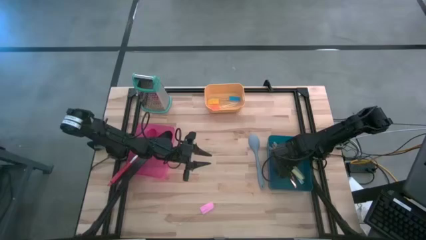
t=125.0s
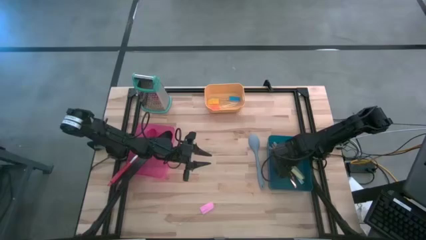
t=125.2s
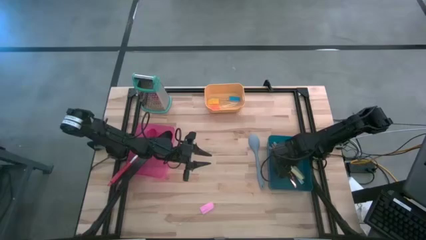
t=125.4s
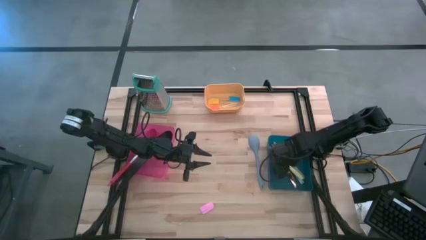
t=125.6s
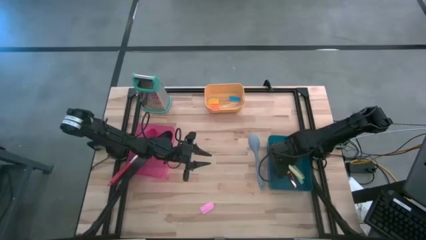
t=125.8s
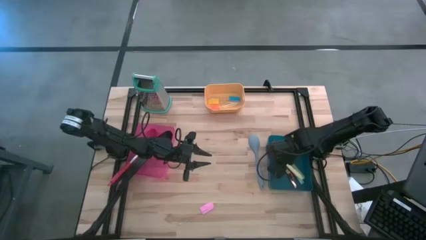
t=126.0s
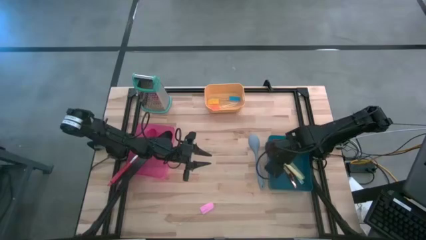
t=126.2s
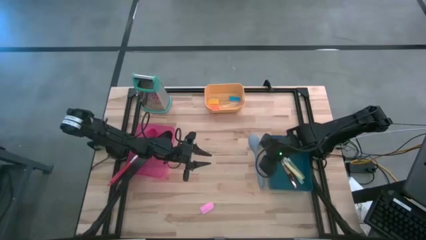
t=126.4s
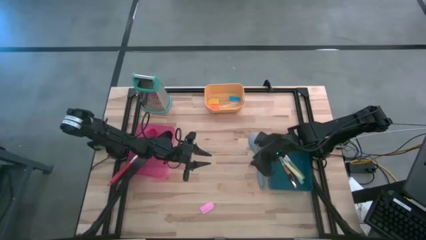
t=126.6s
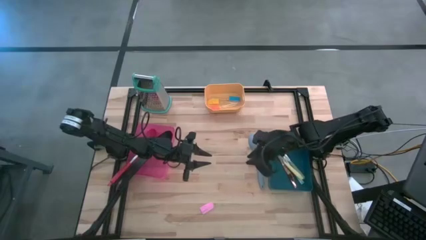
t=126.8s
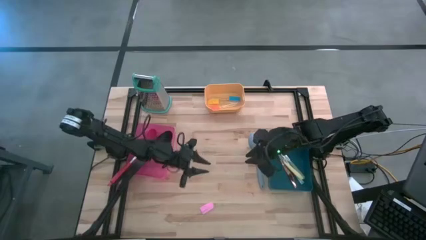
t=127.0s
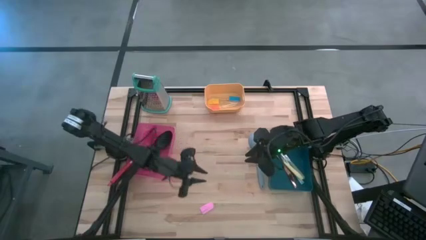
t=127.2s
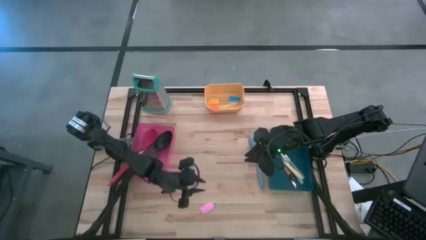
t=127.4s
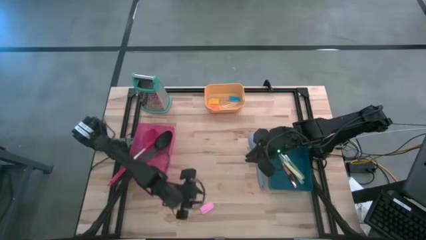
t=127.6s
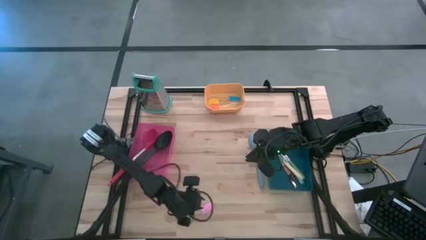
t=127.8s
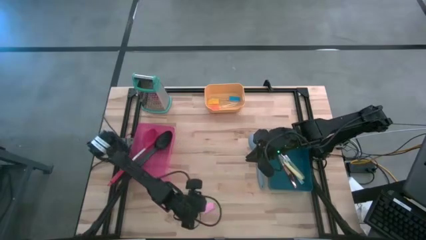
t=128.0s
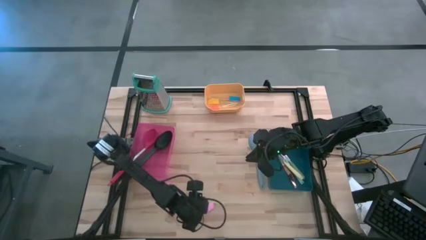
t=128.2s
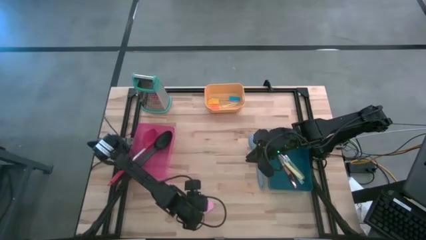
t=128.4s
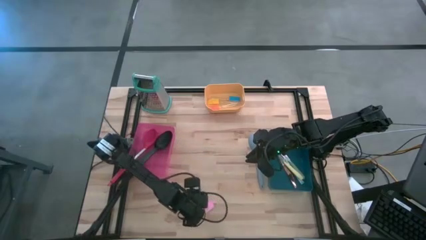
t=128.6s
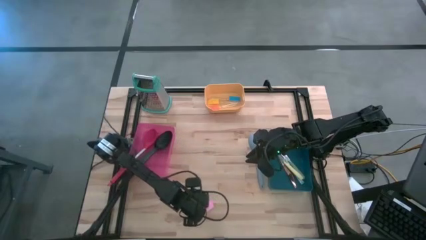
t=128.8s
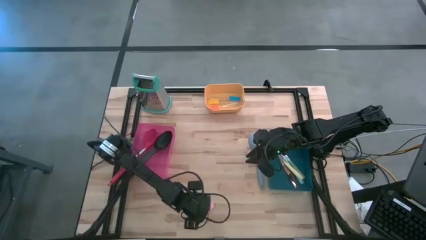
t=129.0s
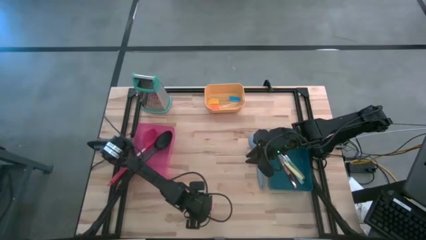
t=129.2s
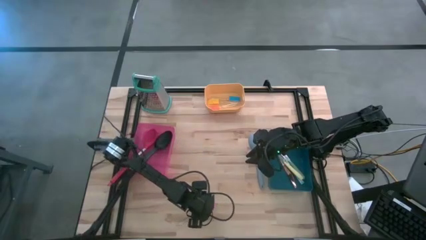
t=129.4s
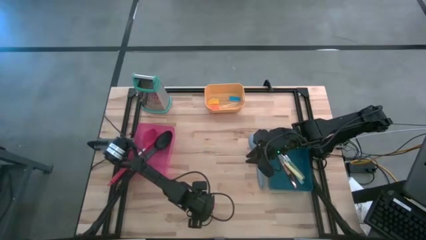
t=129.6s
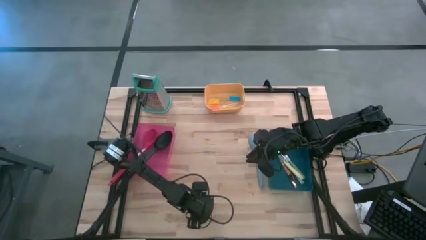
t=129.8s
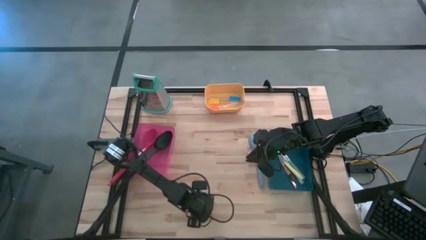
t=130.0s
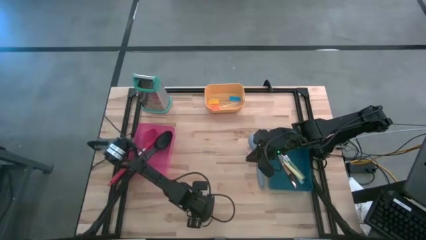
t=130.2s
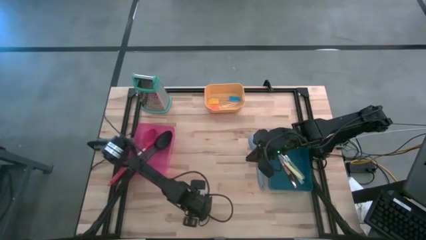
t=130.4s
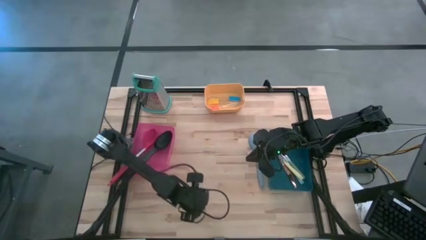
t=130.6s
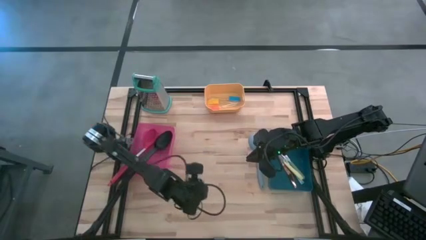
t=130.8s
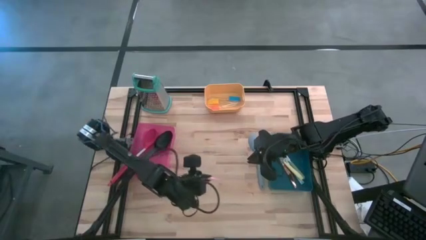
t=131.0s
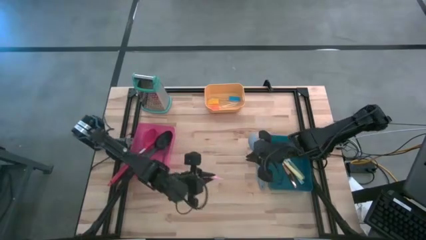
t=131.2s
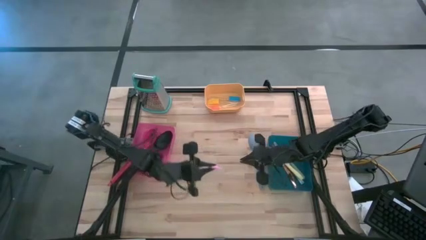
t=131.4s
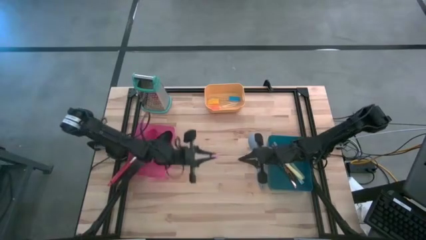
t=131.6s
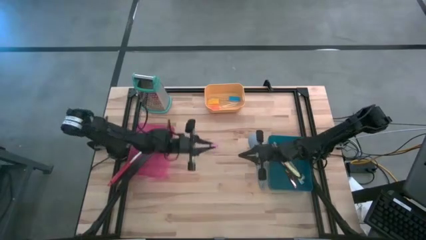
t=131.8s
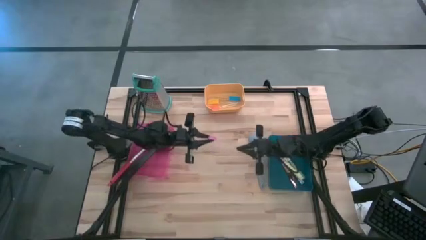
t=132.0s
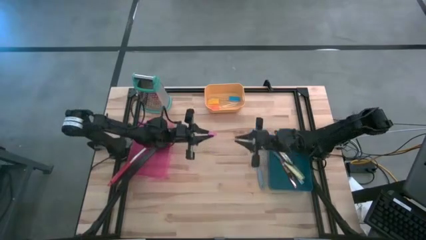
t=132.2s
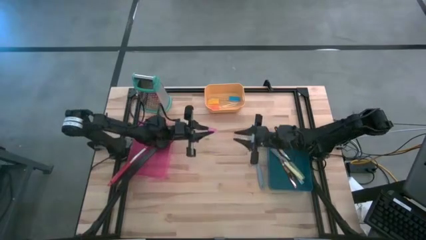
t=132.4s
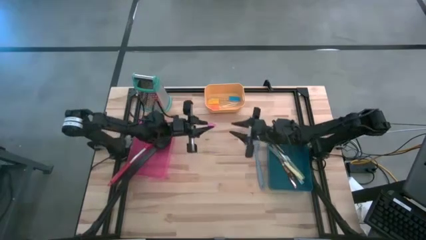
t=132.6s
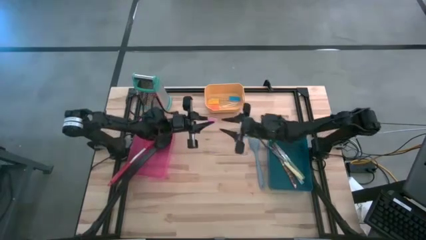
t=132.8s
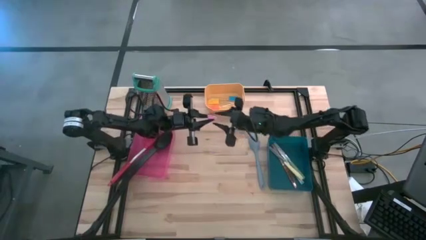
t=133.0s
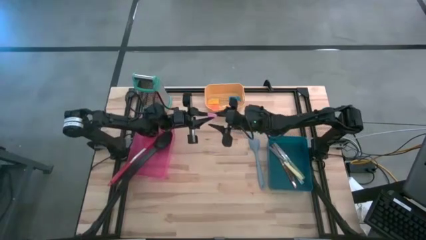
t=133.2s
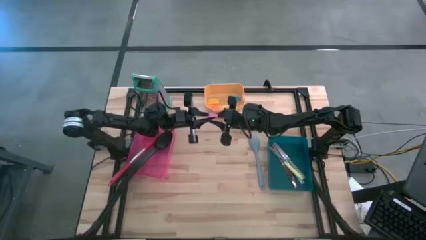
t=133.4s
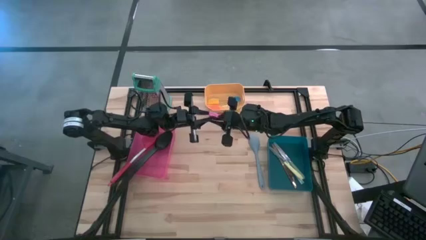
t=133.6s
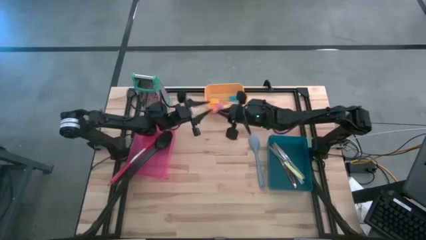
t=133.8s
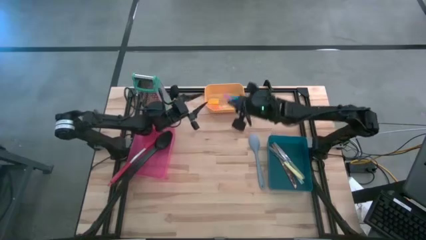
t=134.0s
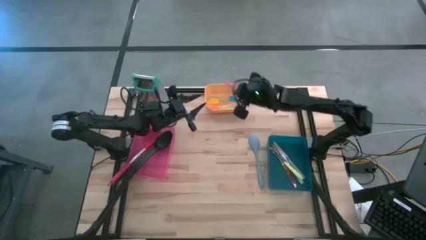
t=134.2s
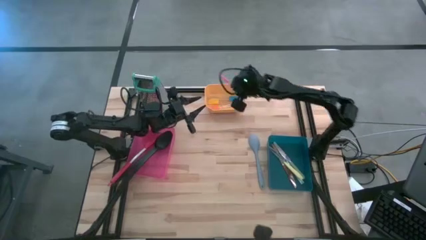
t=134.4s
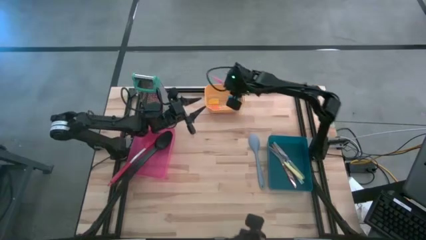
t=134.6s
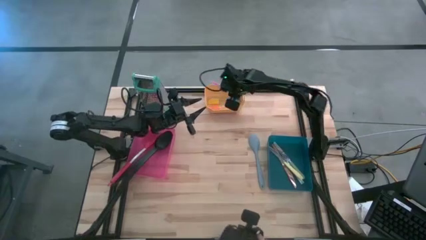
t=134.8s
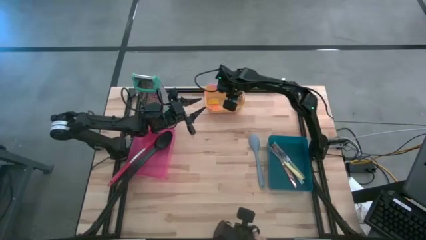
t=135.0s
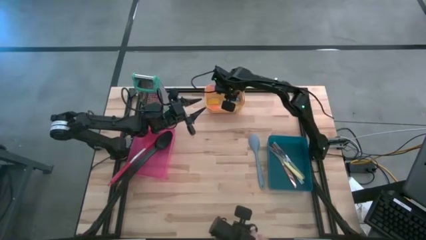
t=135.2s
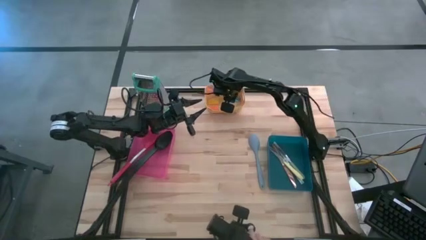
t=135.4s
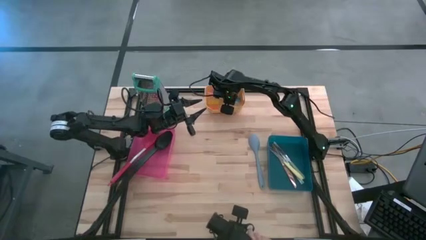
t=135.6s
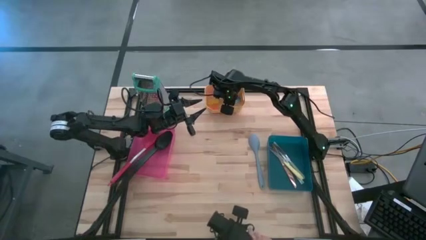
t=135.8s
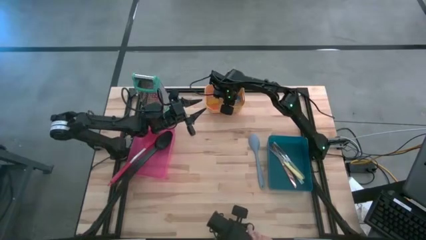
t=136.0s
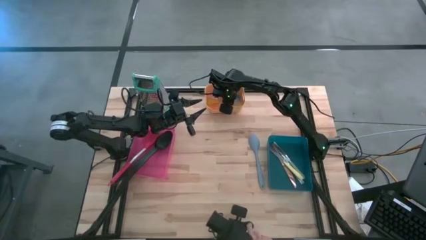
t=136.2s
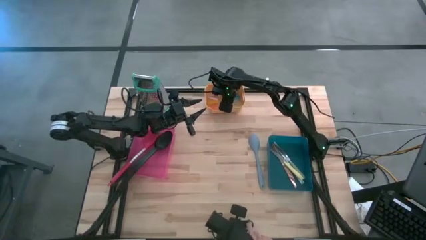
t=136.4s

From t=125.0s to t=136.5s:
Task: Pick & Place Kitchen Items
Put the pink spatula into the yellow bin

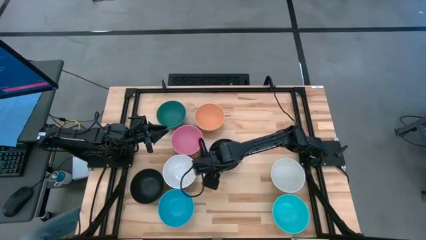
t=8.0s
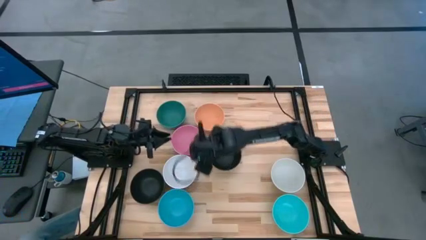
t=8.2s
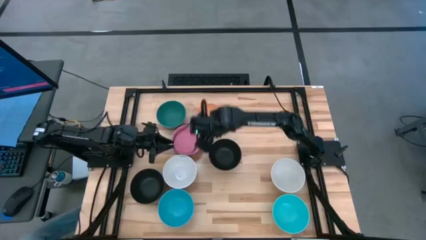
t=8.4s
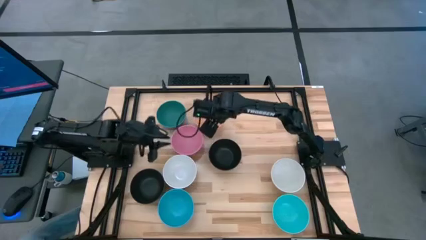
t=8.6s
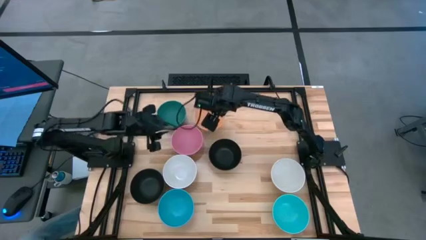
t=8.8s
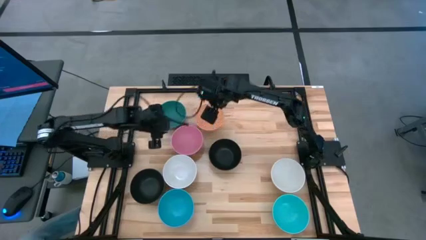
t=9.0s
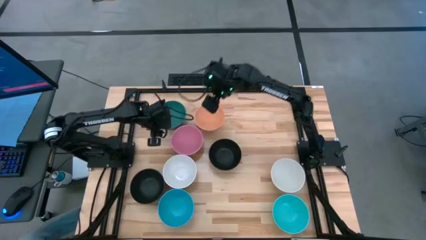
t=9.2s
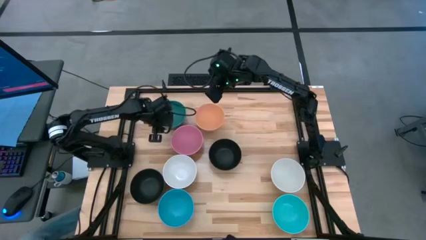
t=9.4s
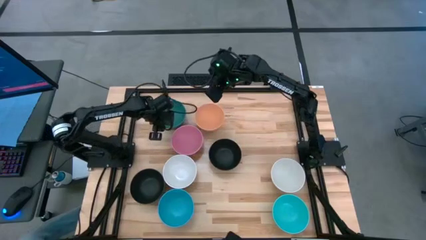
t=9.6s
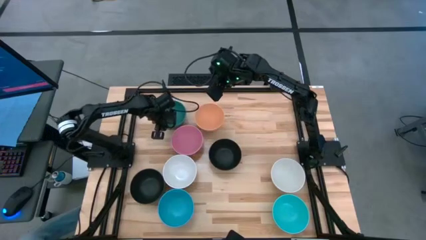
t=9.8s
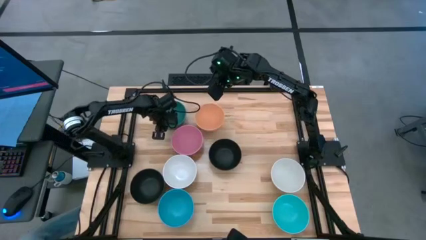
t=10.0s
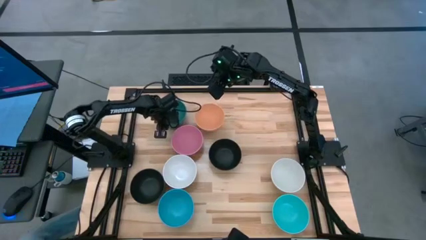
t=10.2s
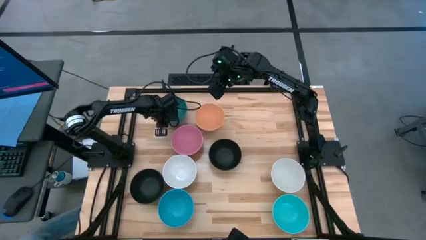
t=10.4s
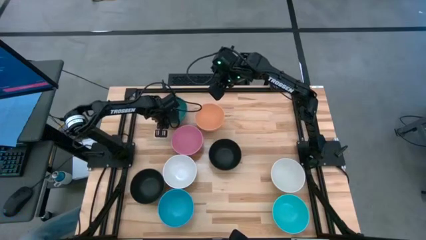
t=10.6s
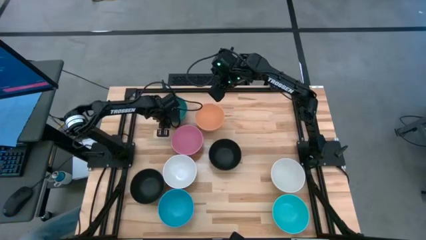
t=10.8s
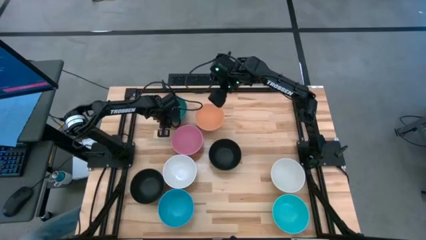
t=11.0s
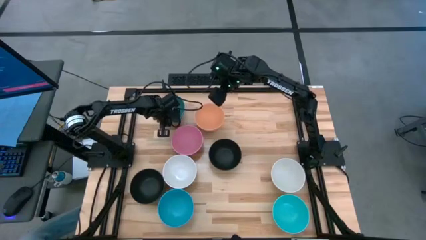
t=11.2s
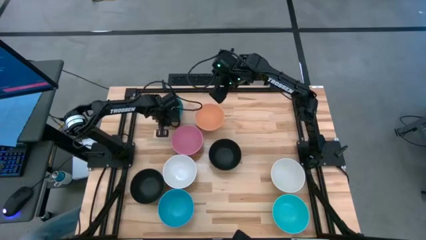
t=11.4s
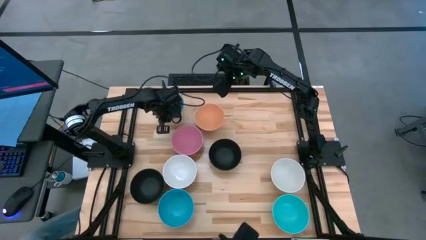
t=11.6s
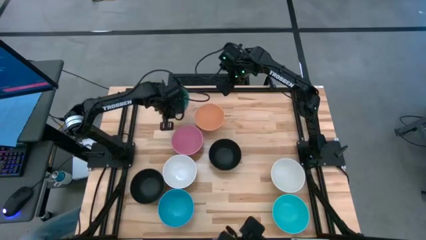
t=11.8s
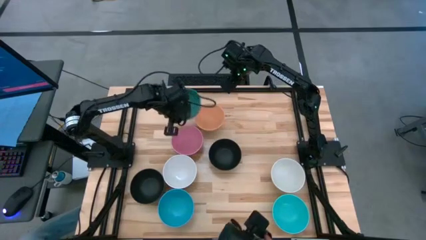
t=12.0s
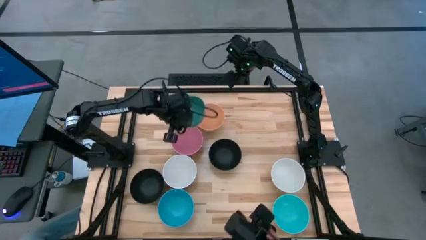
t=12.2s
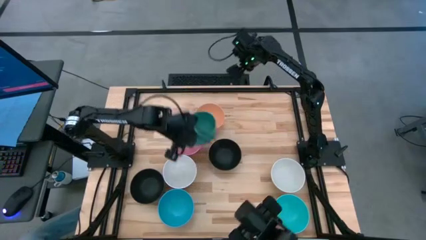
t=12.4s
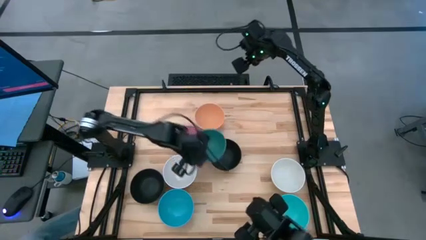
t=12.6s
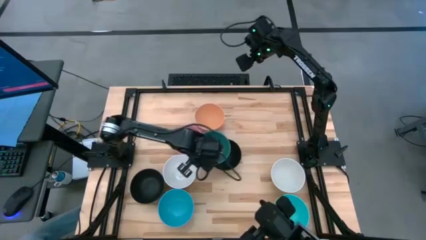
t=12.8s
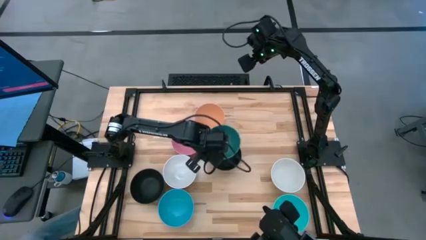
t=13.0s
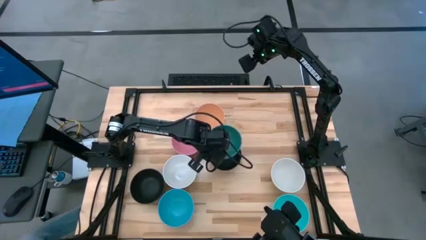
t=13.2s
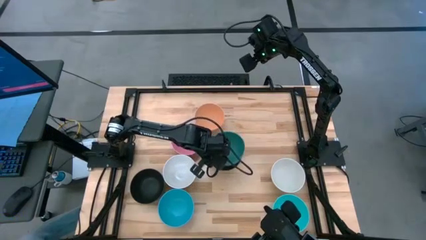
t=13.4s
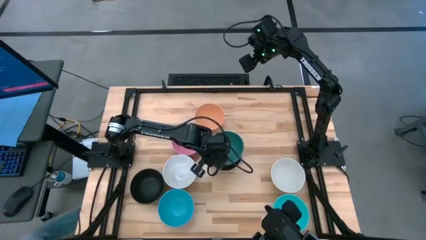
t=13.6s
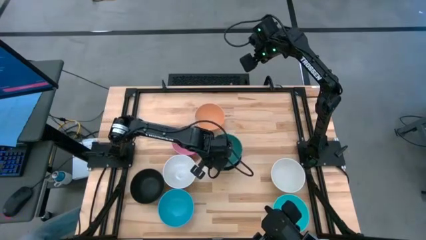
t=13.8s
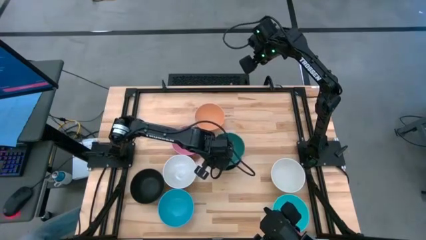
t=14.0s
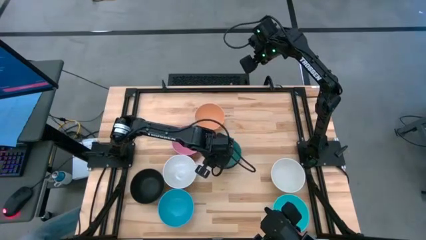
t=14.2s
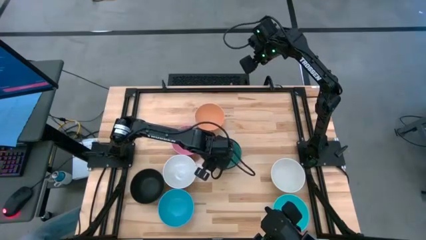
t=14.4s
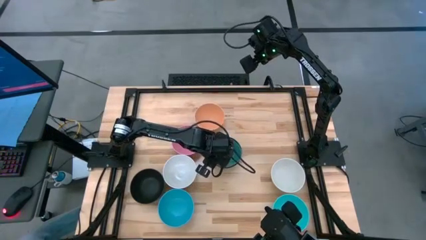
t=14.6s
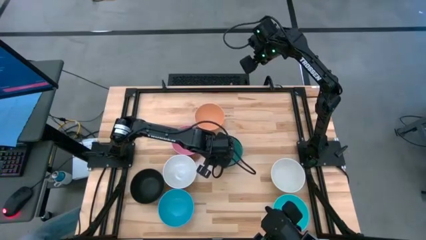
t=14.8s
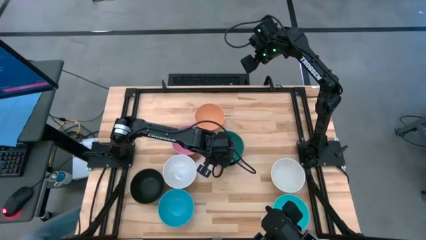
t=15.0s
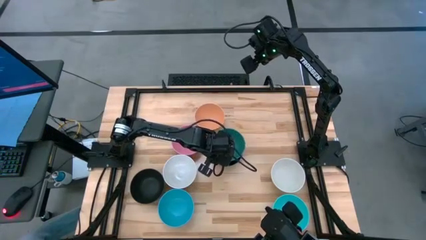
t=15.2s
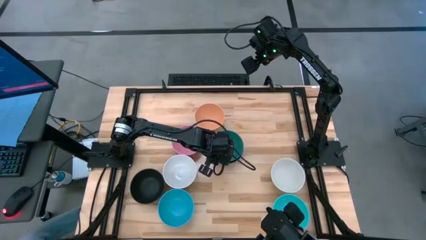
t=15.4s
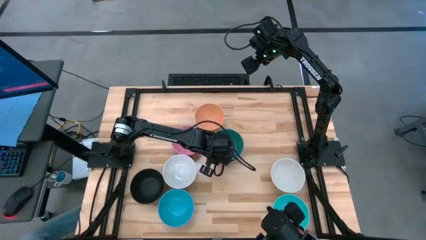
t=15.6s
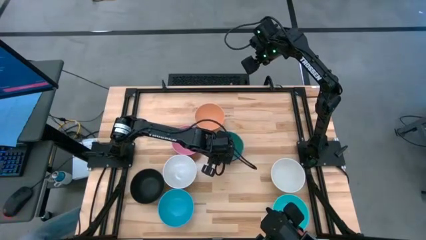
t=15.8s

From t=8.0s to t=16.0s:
Task: Nest bowls inside each other
Stack the dark green bowl on top of the top black bowl
